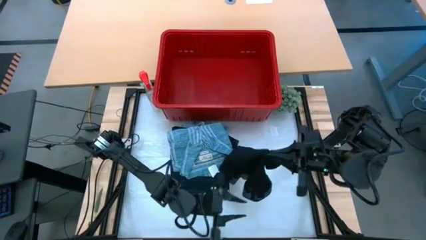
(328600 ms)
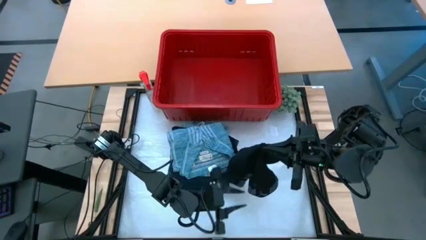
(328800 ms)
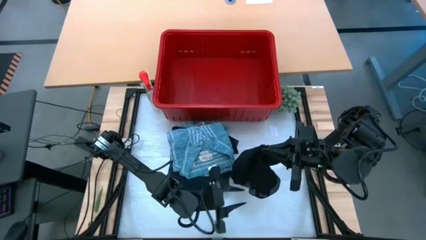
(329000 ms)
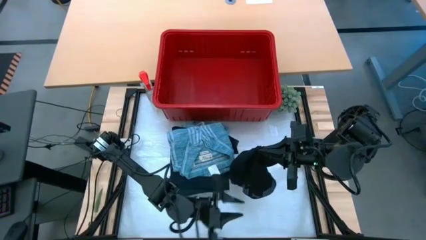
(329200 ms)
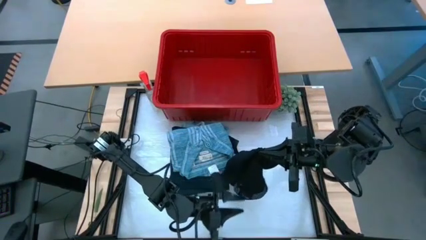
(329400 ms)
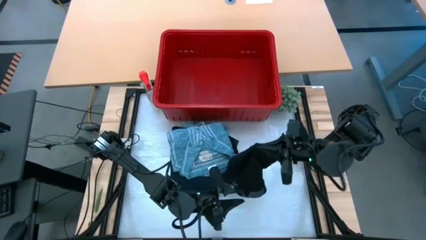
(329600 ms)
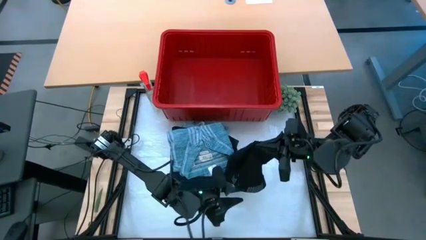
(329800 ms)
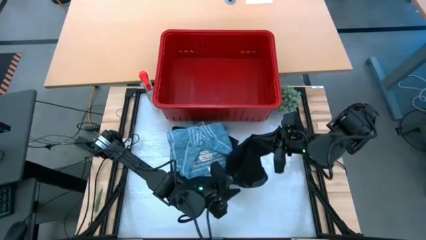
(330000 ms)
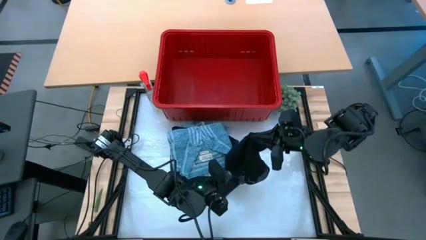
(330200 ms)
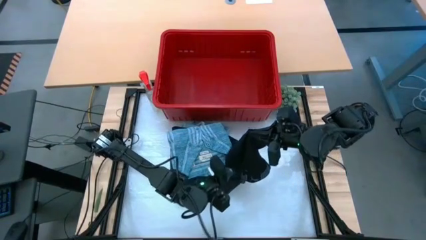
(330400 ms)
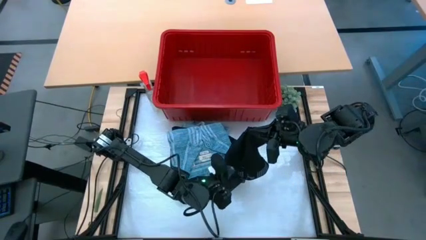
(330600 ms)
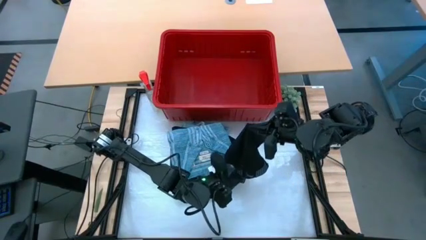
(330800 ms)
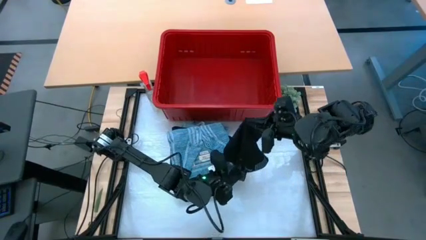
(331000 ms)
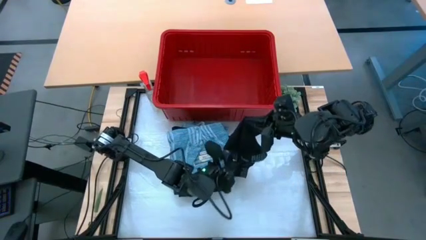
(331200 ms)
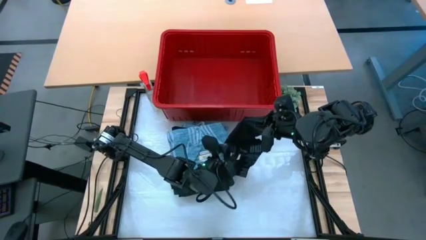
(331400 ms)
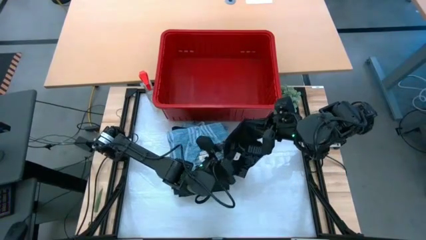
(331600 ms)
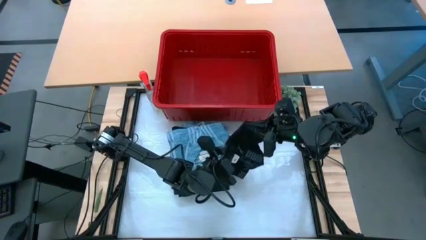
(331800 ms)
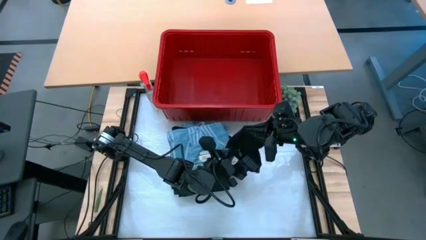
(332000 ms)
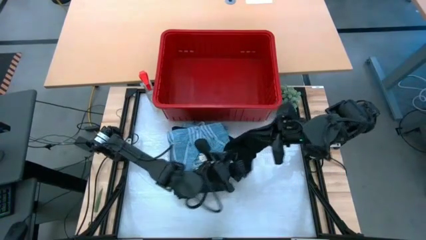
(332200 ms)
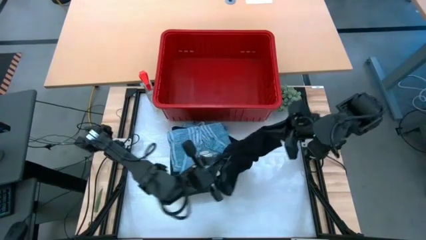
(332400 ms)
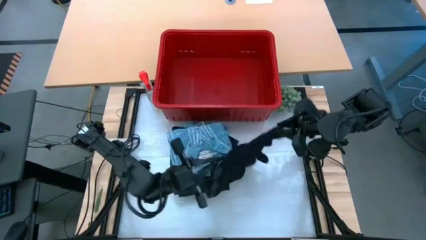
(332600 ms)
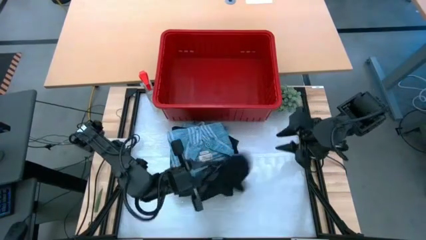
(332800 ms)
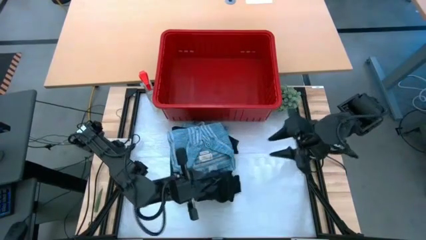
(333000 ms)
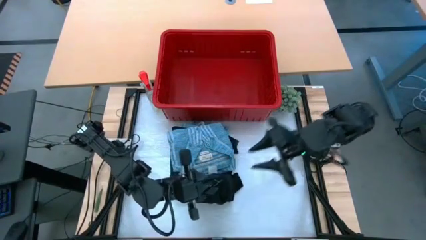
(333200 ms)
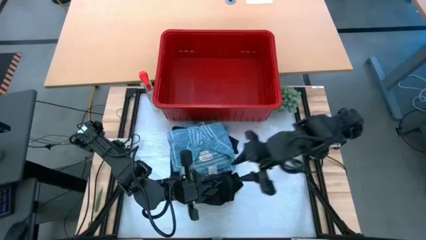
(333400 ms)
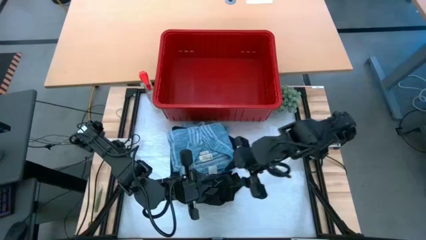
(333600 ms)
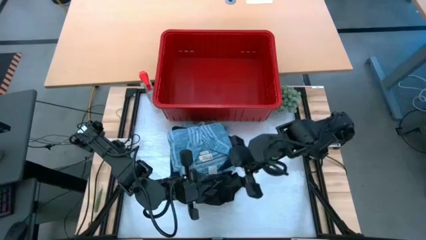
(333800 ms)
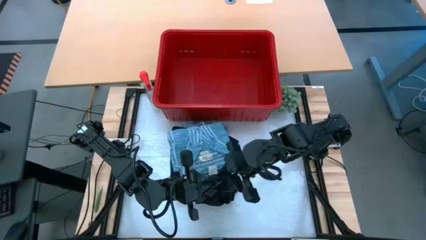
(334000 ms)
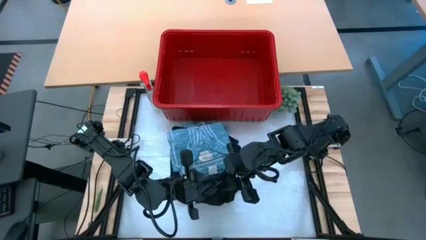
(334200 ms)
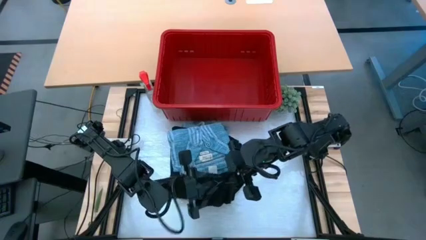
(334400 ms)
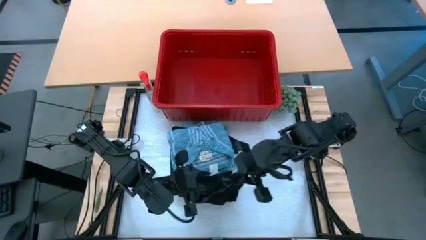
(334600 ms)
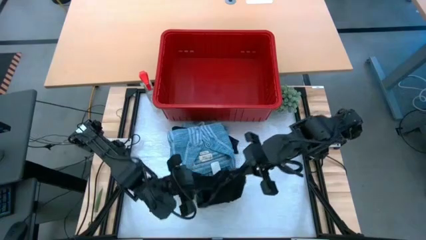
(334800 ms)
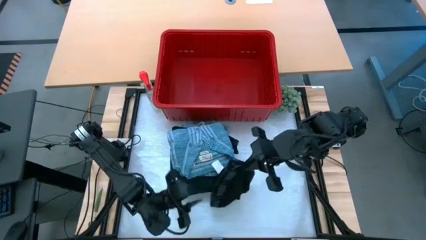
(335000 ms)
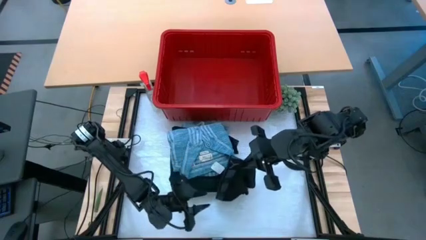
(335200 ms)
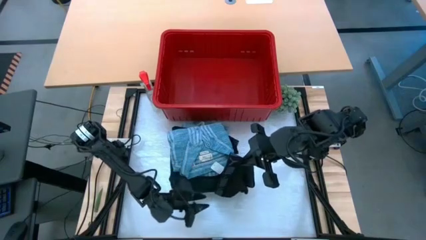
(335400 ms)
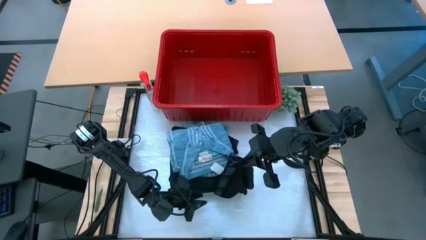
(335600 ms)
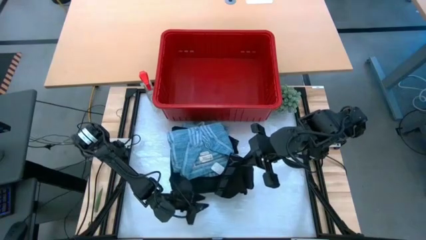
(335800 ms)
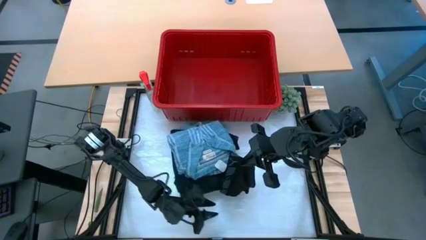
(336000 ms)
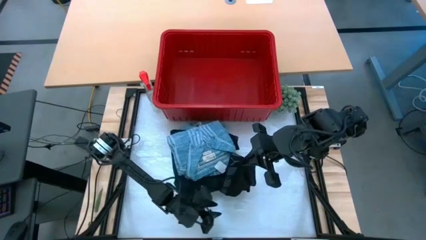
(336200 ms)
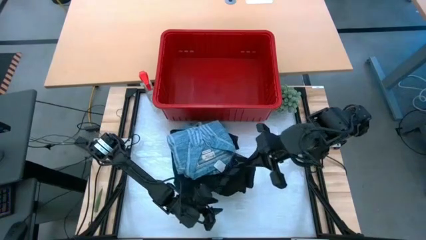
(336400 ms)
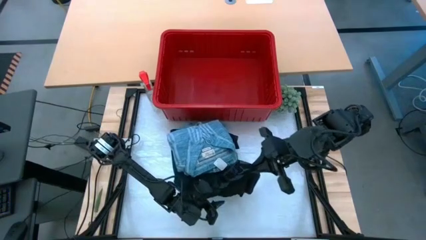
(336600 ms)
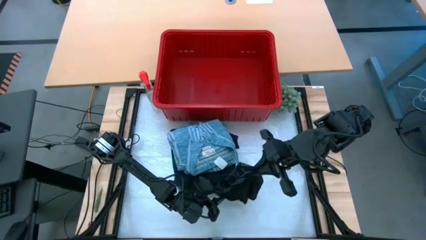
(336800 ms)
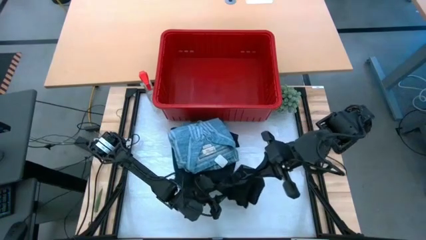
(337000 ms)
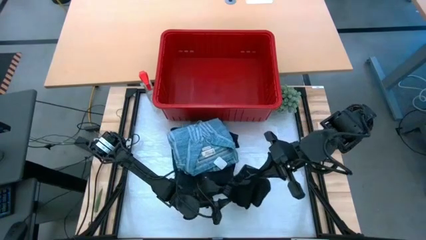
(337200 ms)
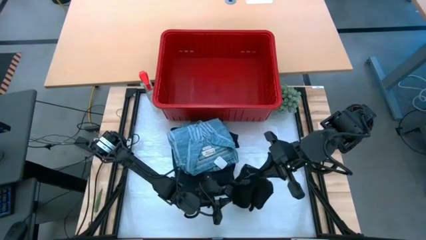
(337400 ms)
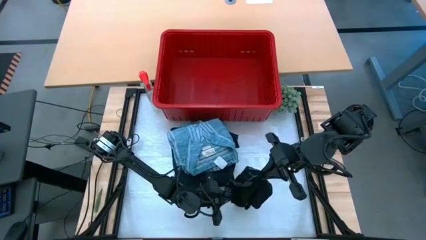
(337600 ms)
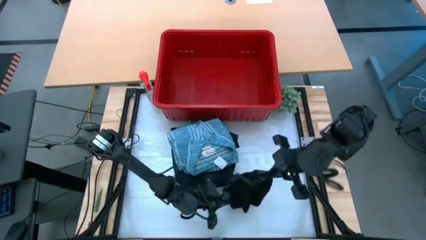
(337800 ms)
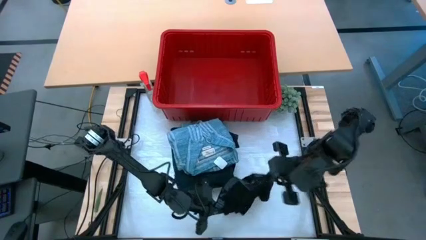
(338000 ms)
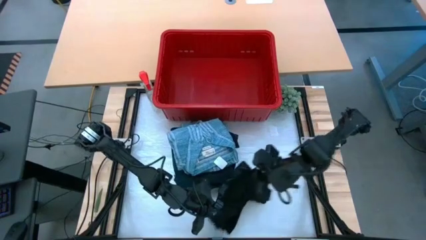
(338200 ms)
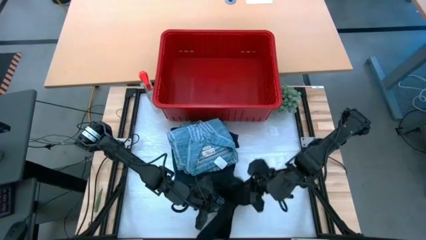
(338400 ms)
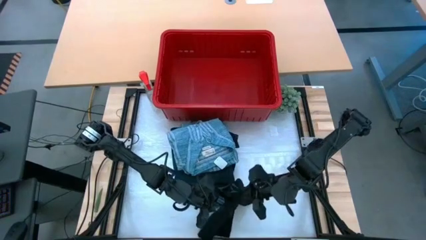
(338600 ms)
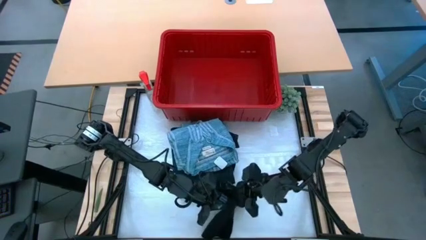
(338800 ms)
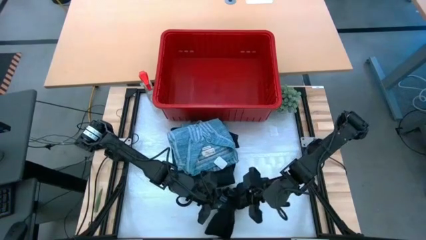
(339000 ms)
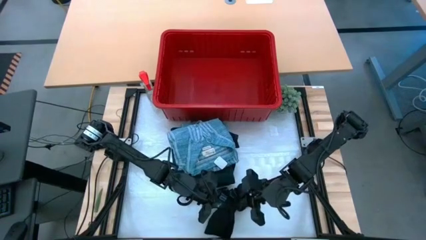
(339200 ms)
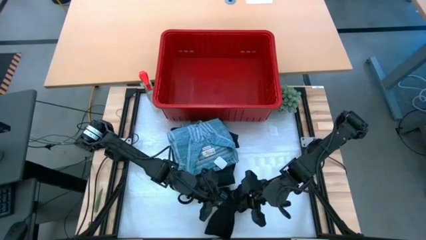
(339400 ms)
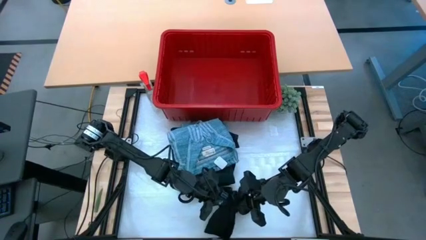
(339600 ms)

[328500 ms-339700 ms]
Task: Fold Laundry from Bin
Fold the black underwear

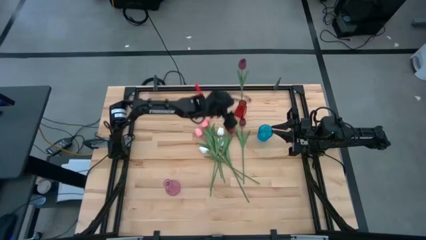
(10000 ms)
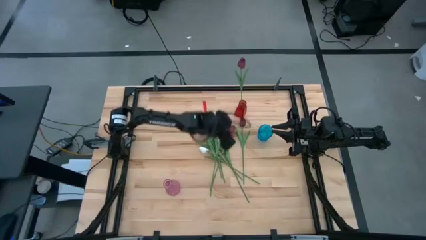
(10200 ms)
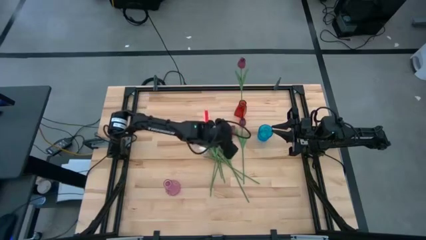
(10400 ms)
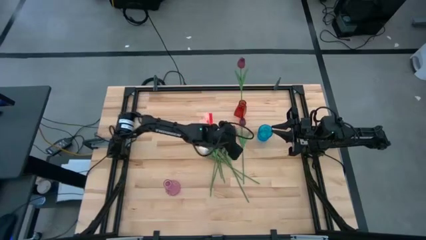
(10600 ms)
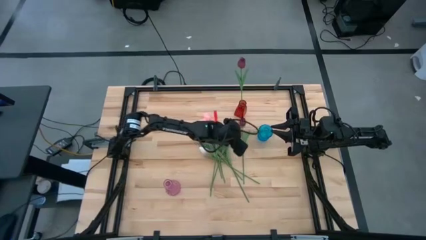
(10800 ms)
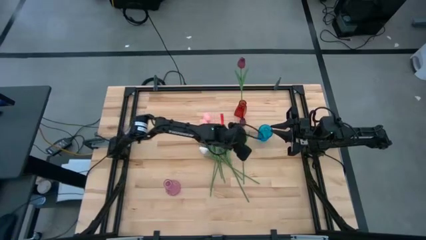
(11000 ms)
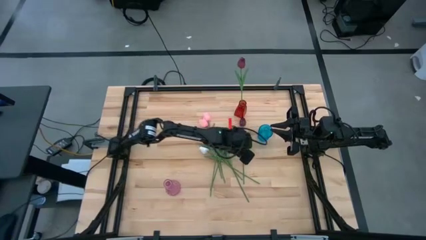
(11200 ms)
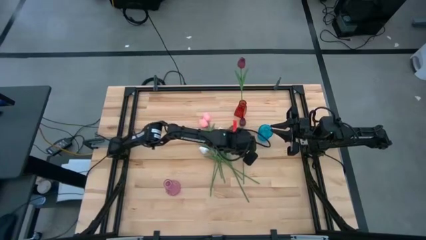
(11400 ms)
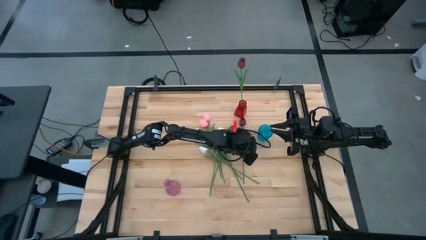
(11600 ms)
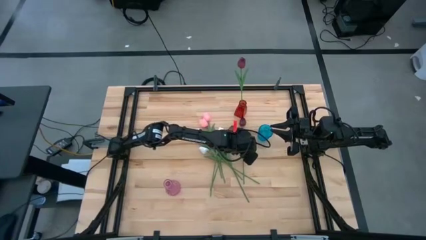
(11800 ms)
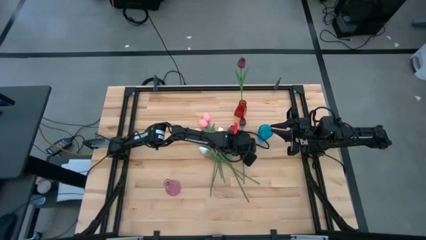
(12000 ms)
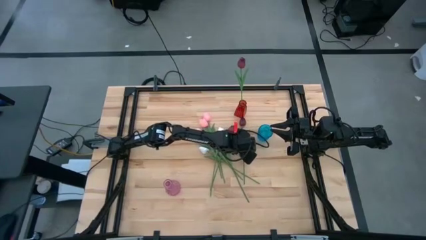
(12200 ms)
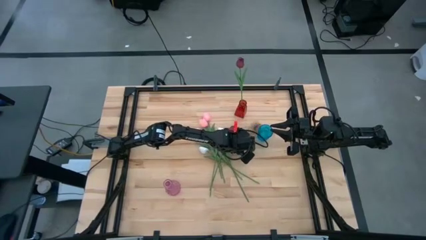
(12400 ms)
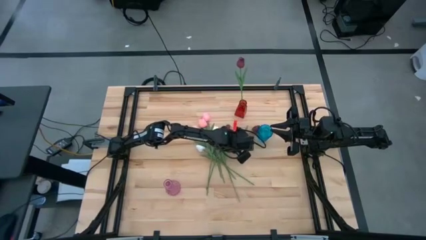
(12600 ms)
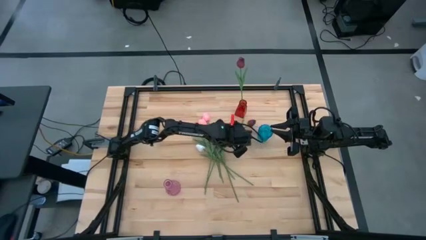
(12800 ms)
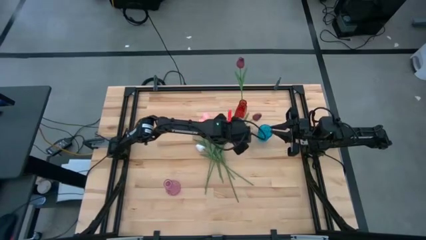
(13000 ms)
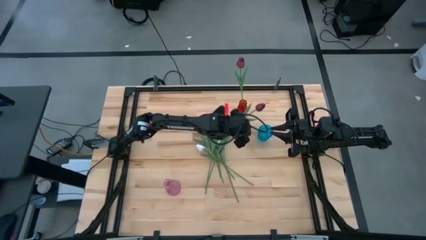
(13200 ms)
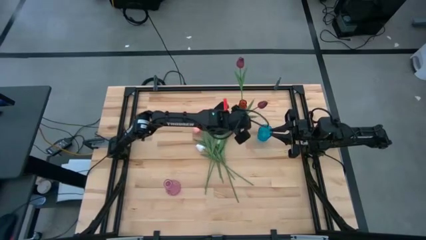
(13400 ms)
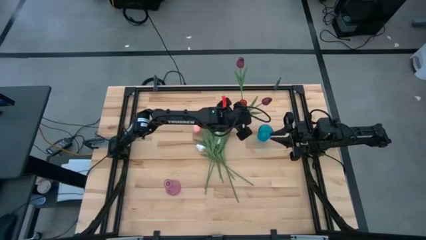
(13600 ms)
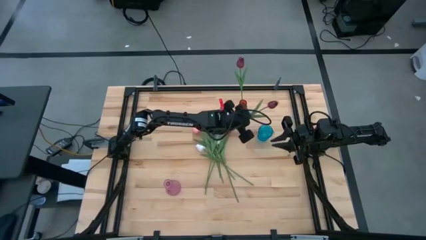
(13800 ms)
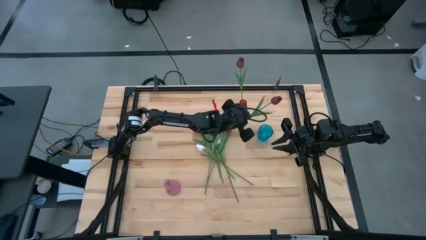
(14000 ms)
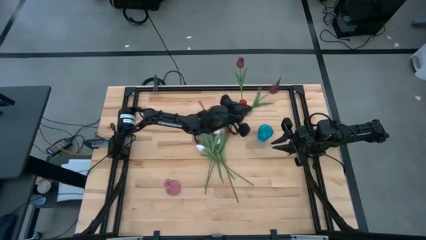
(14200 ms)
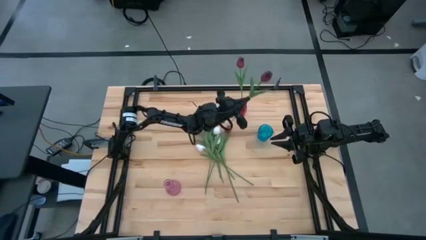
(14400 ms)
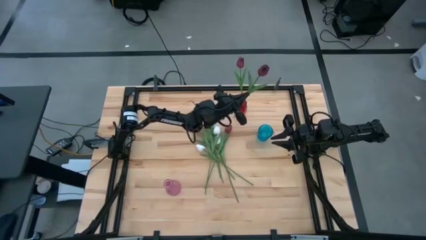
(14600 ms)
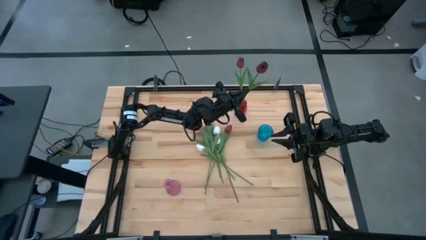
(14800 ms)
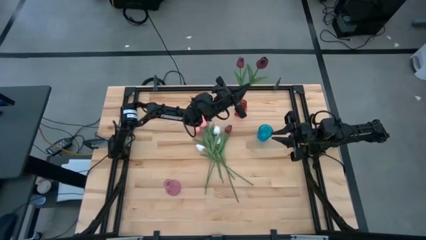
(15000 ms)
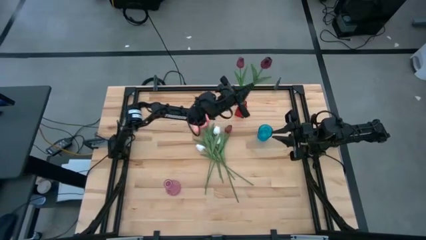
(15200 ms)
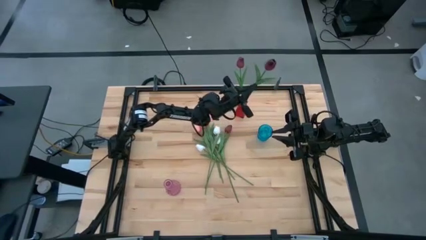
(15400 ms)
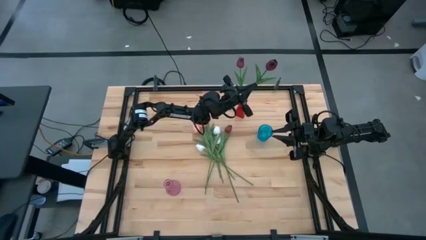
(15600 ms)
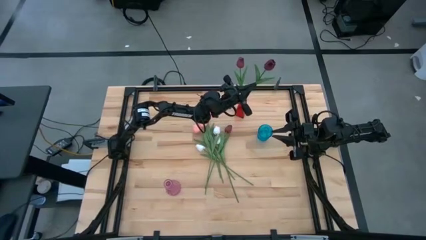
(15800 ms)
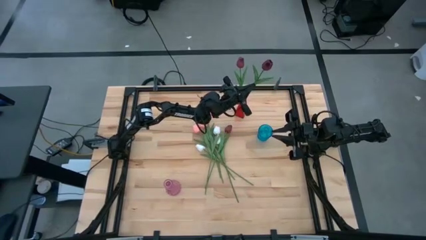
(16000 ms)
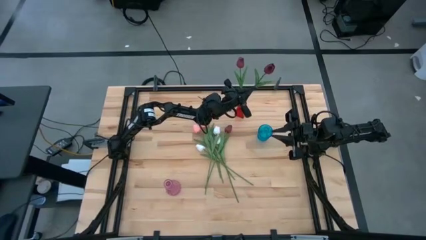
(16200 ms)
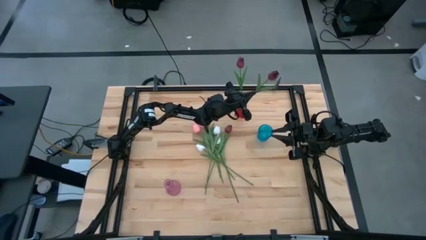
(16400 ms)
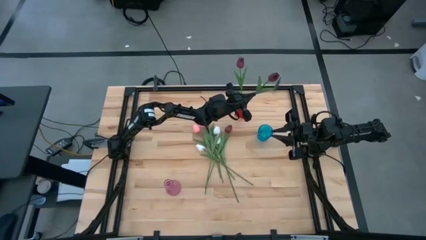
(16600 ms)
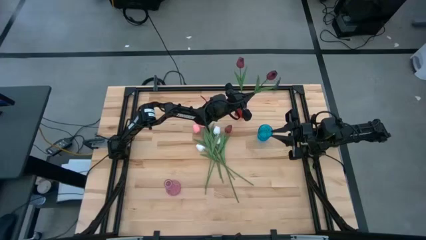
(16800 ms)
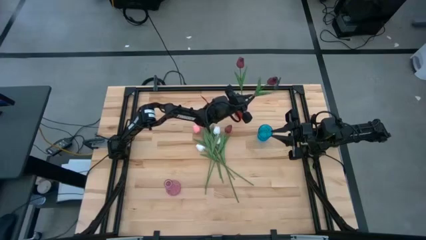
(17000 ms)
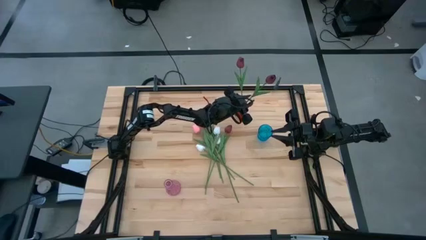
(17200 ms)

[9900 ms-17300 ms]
Task: Sort flowers into vase by color
Put the left red tulip into the red vase
